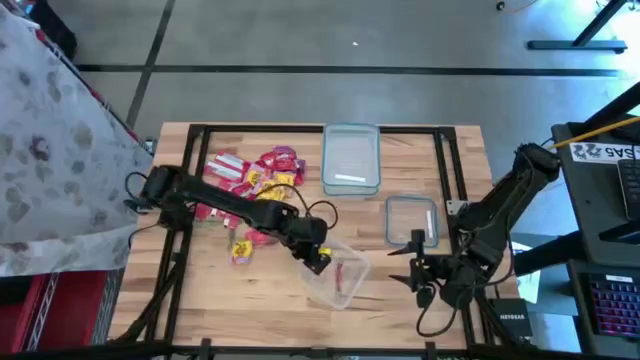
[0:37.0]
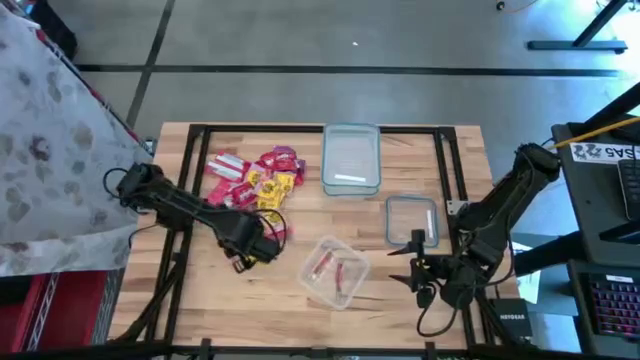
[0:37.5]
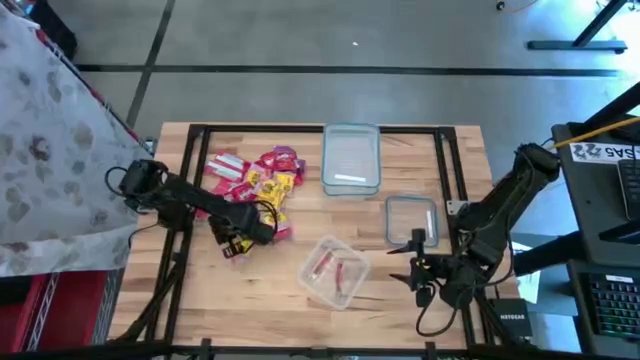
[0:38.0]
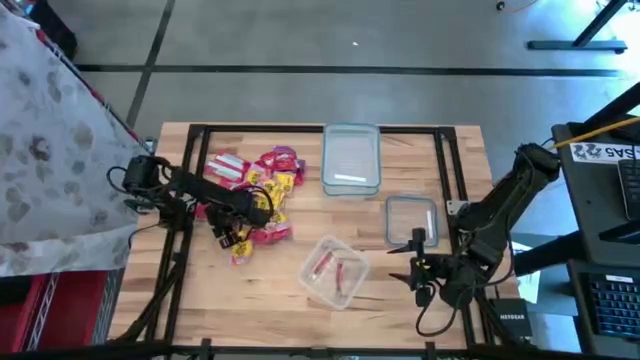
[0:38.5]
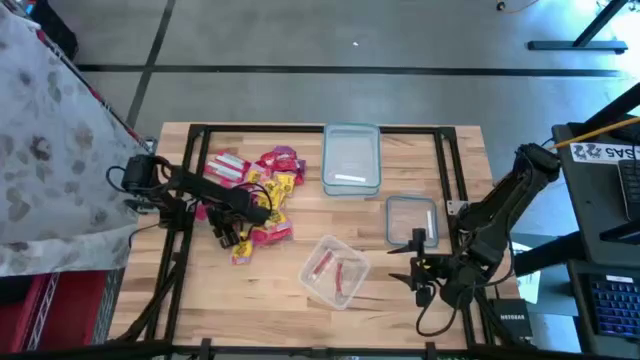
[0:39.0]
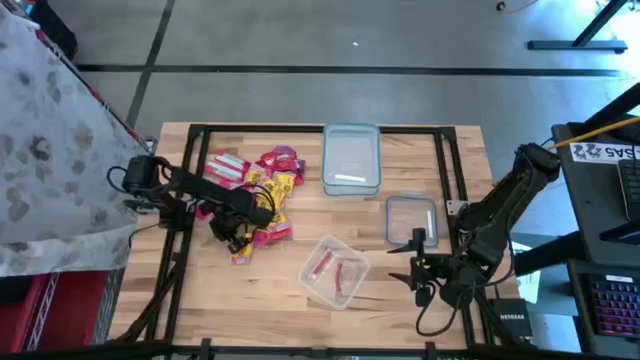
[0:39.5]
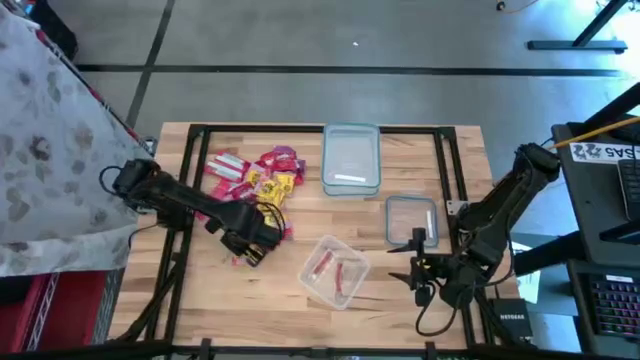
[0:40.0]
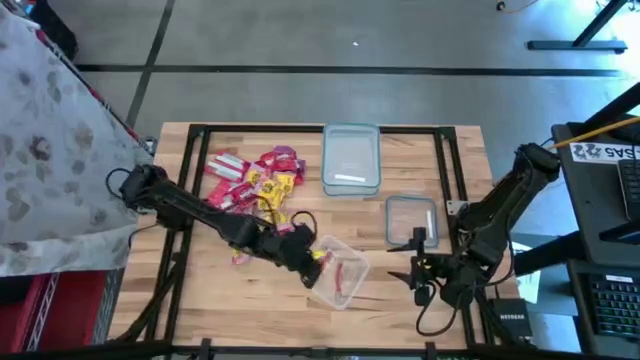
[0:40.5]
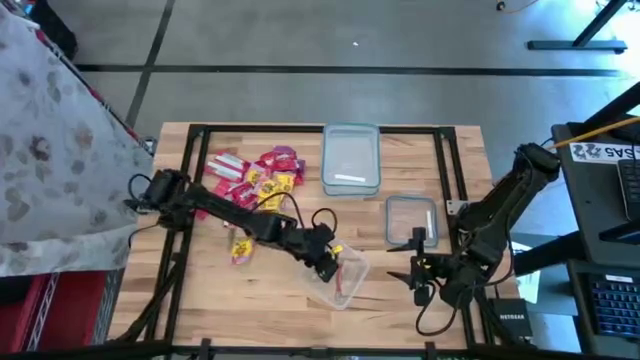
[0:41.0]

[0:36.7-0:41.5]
Task: Sort candy
Put the green candy into the square transparent food container

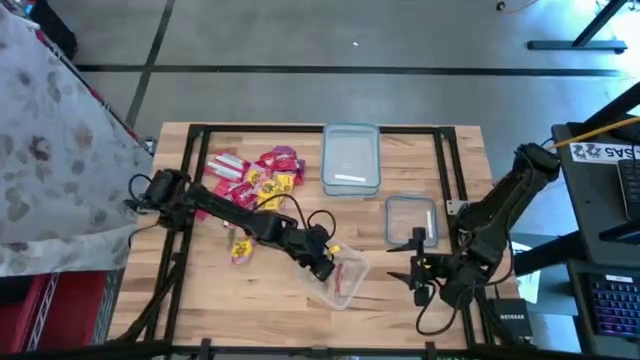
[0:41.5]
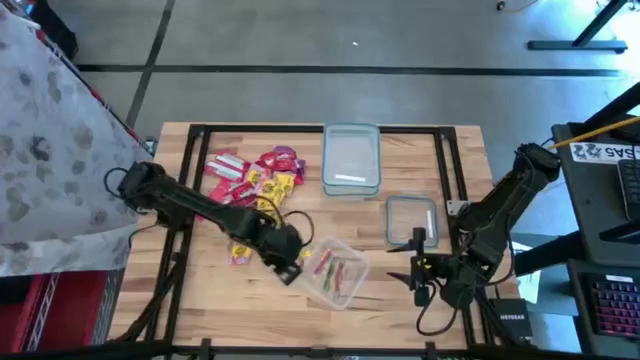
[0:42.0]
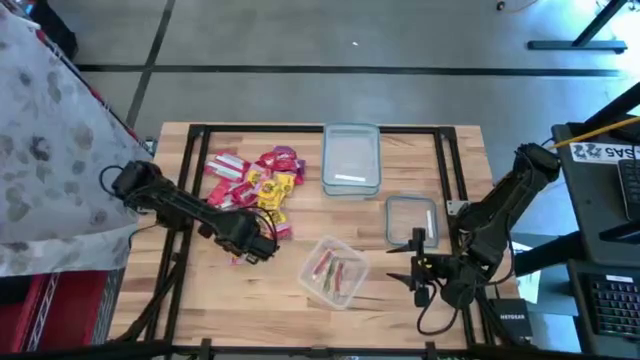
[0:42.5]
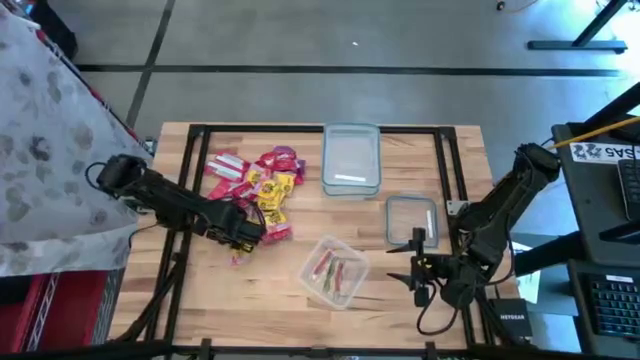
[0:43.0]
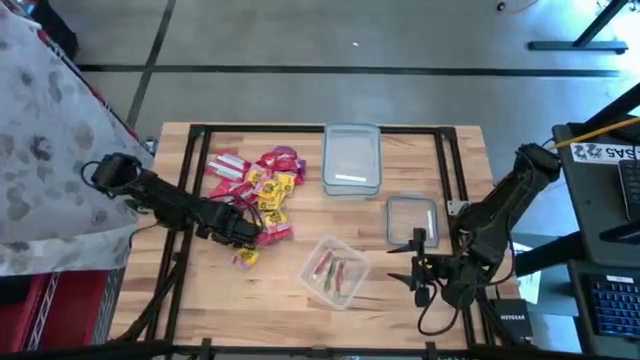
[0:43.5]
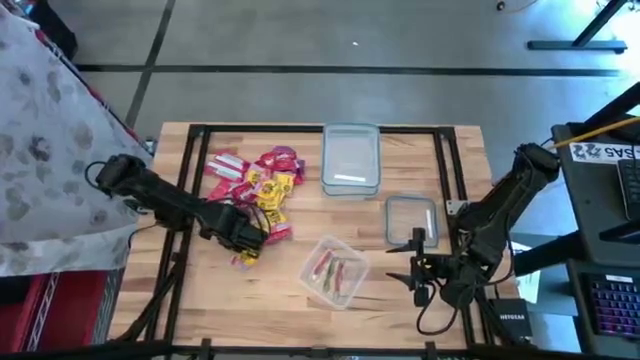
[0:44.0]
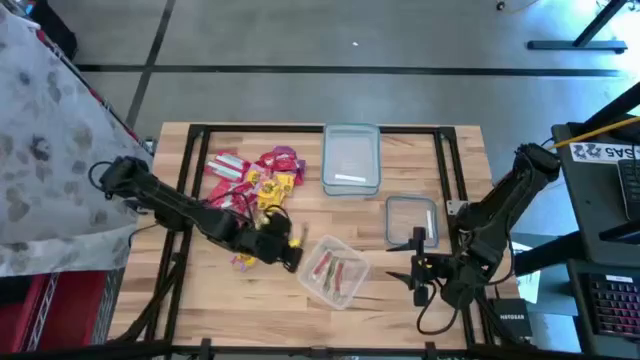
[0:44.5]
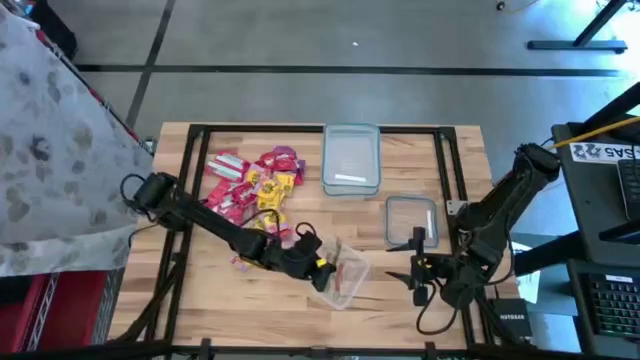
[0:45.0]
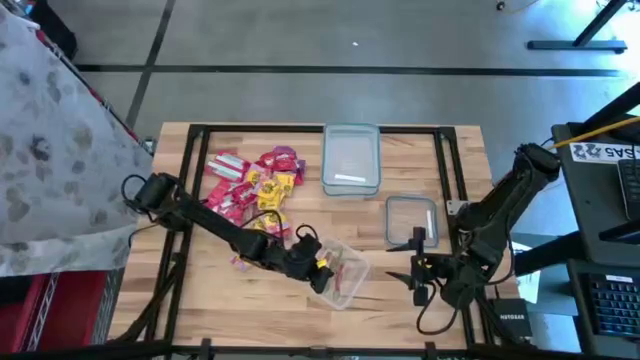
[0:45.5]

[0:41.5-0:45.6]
Put the green candy into the square transparent food container

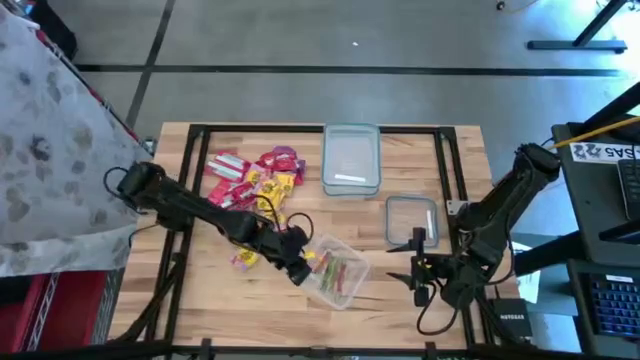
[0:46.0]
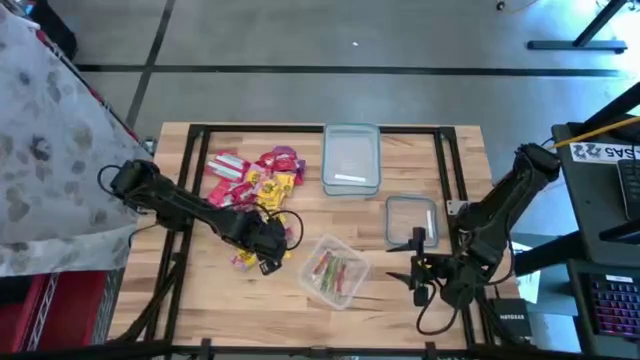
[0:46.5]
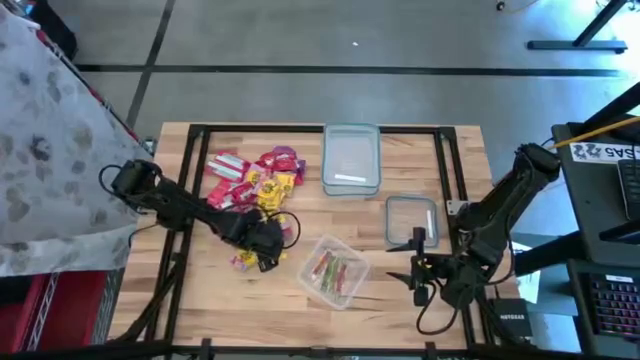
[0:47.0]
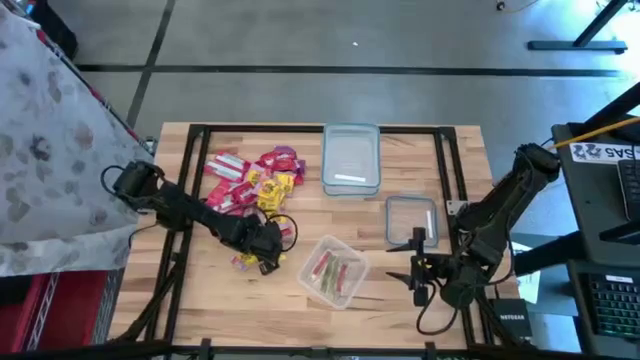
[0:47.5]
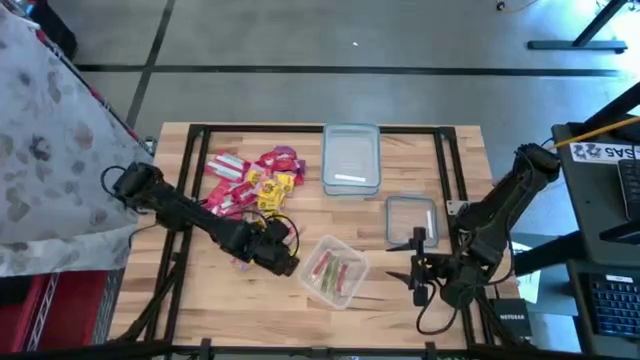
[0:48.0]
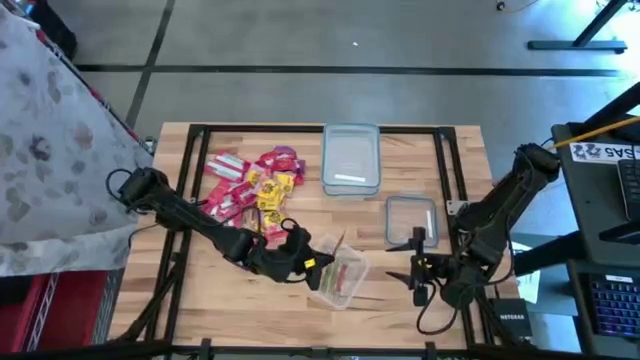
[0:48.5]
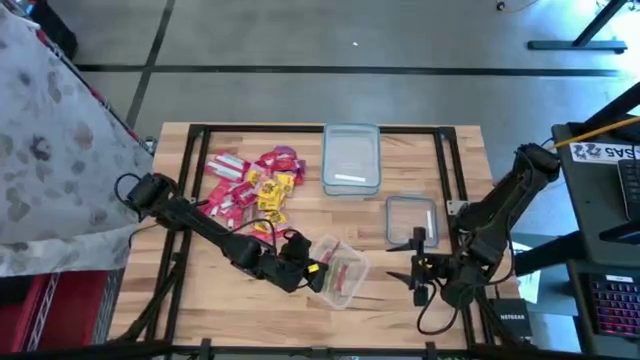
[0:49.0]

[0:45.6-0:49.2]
Put the red candy into the square transparent food container

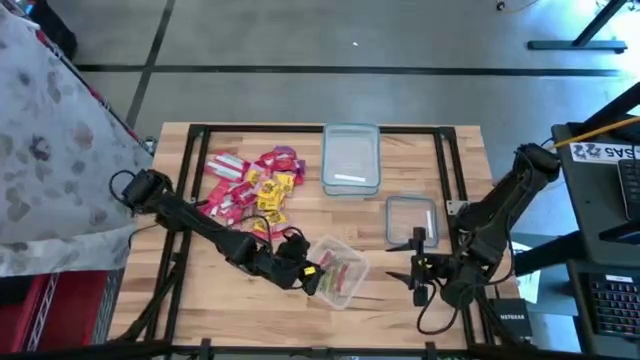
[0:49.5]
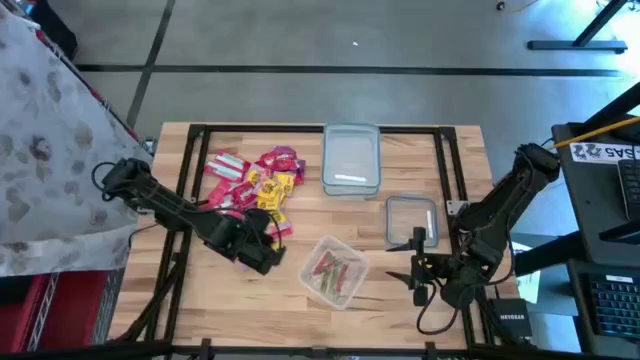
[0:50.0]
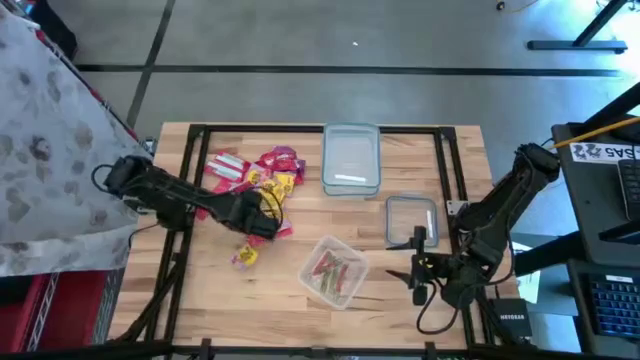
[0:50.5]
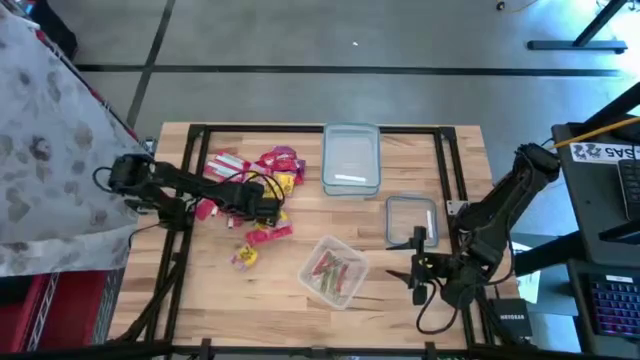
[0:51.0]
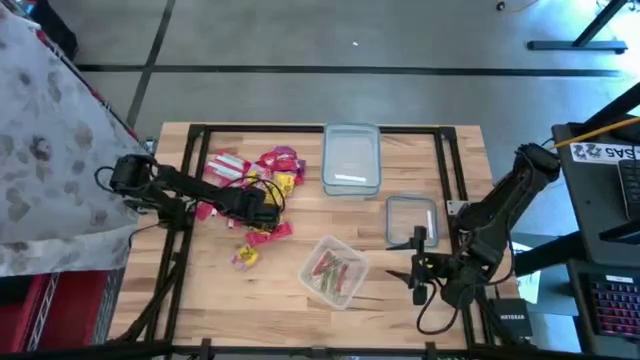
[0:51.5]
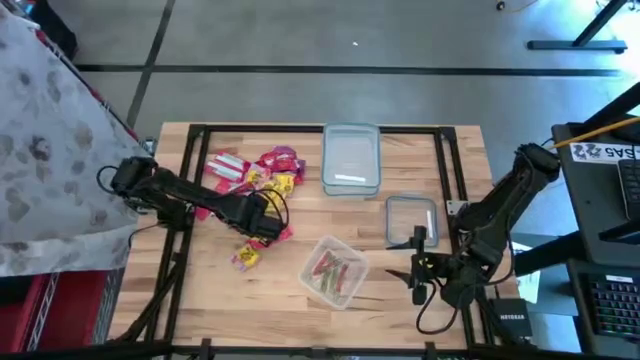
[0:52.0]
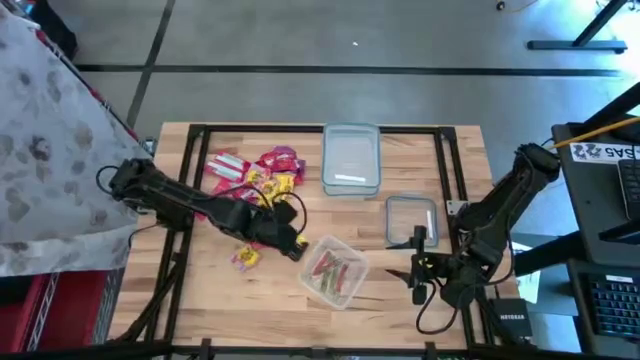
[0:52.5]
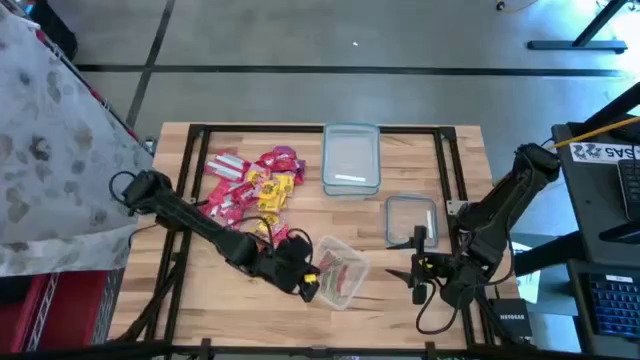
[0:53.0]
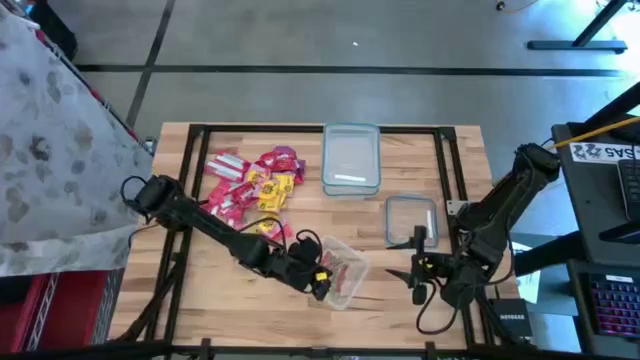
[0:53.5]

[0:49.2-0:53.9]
Put the red candy into the square transparent food container

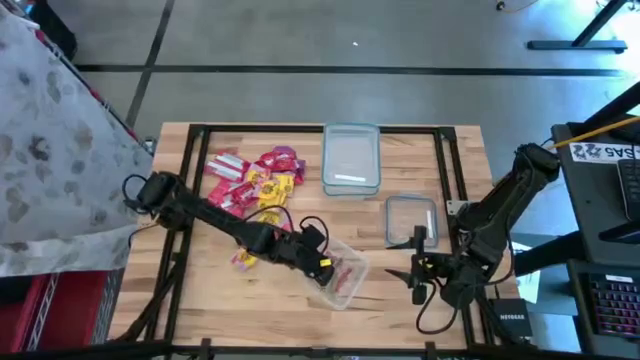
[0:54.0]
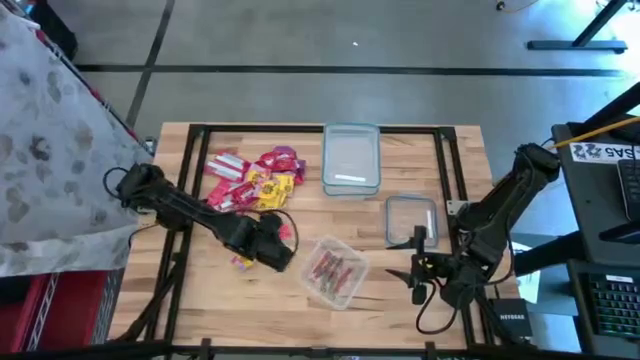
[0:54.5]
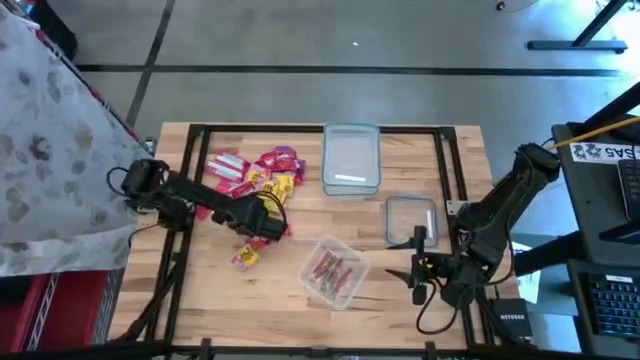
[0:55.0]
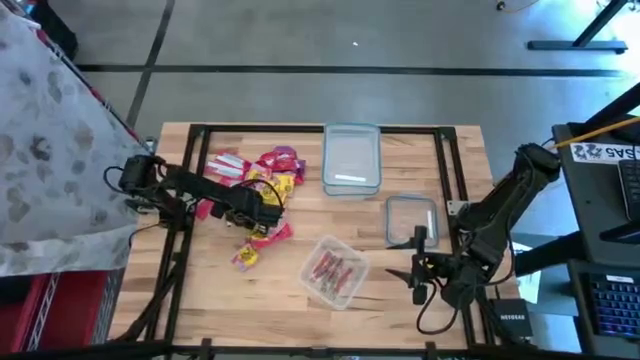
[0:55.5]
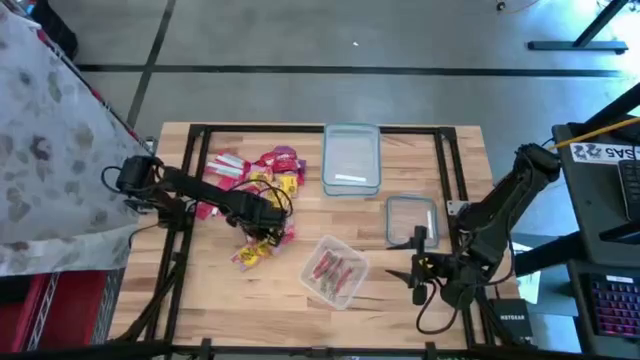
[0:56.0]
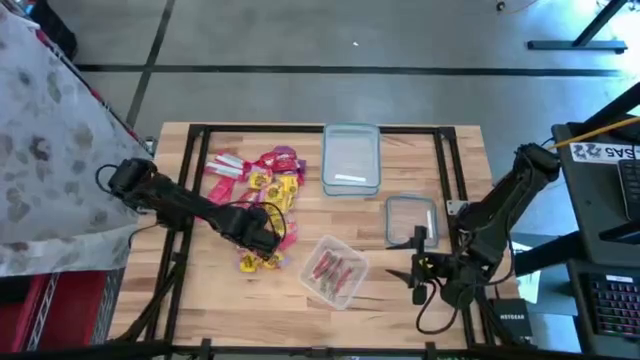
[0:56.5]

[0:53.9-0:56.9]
Put the blue candy into the square transparent food container

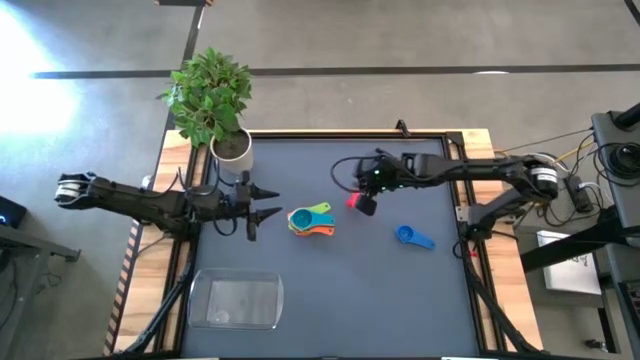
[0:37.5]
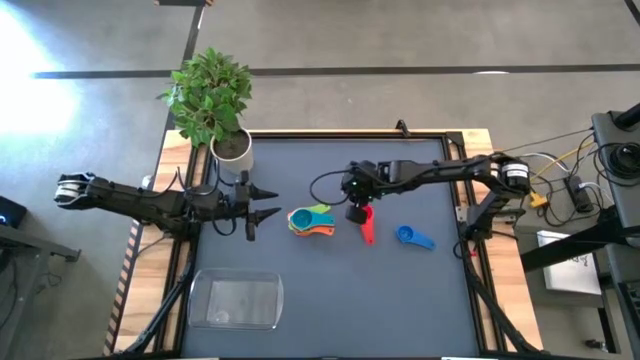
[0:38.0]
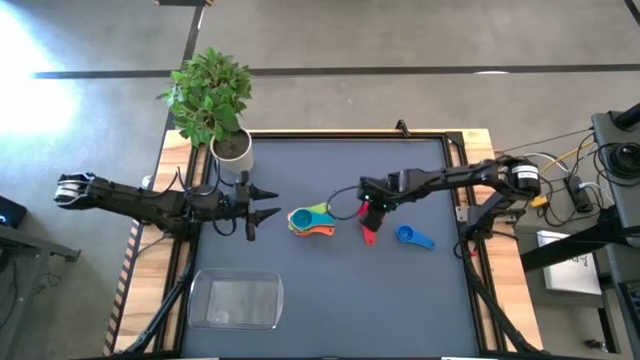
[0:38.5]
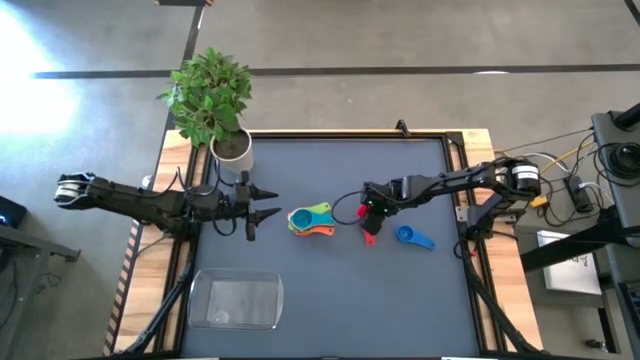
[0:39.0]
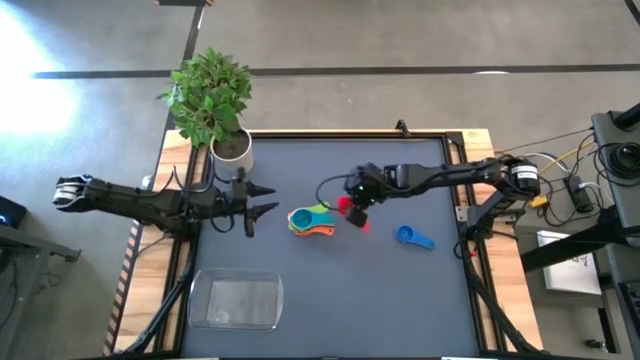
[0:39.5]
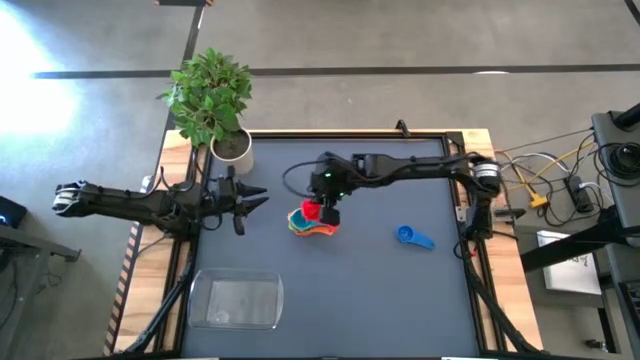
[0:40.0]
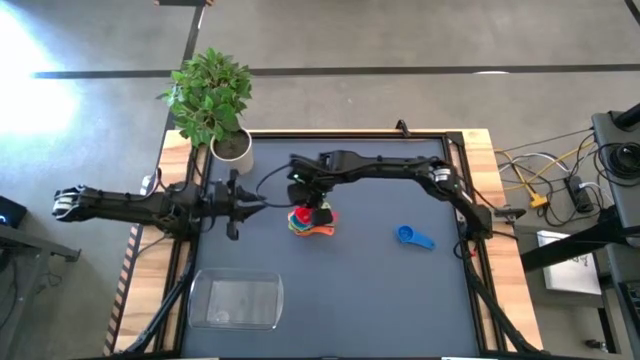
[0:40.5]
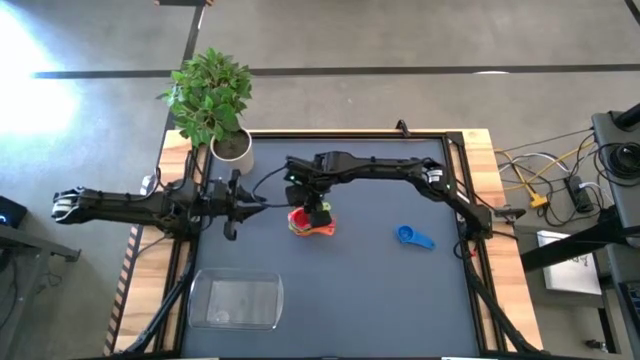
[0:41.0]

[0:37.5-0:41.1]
Task: Nest measuring cups in basket
Stack the red measuring cup on top of the light blue measuring cup
